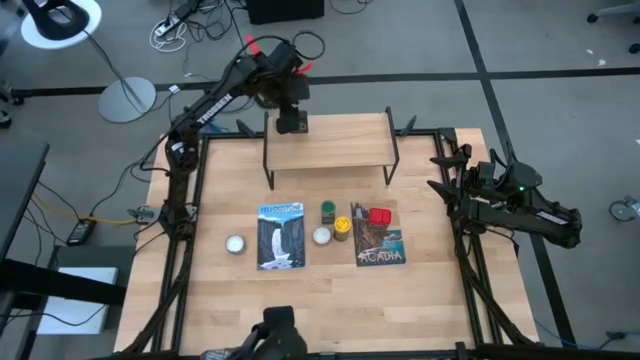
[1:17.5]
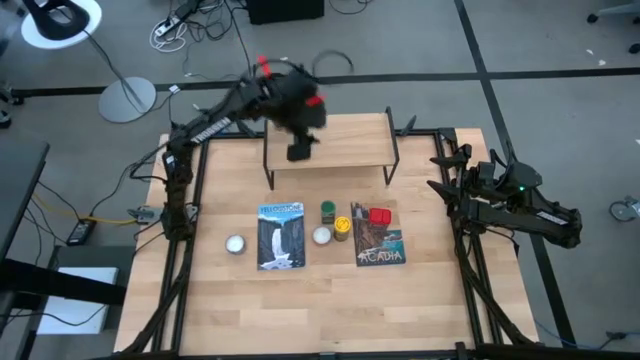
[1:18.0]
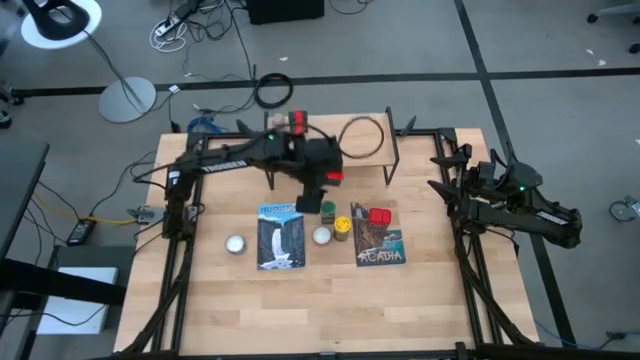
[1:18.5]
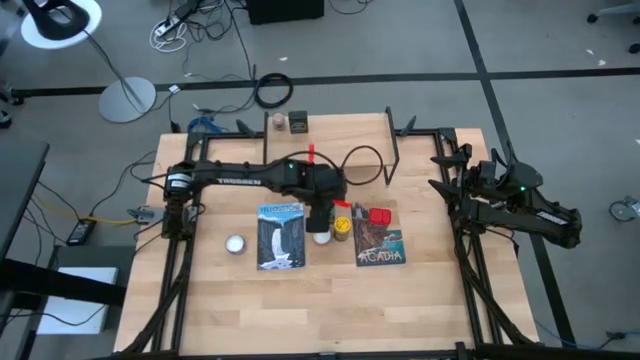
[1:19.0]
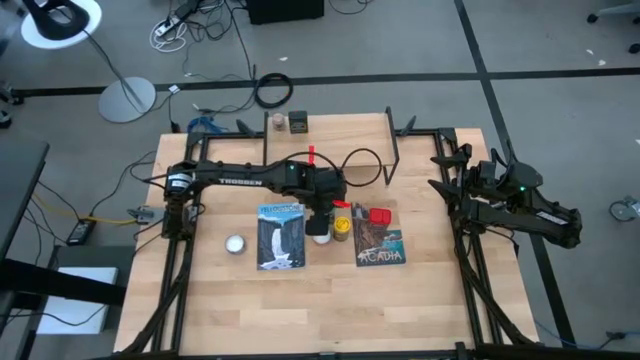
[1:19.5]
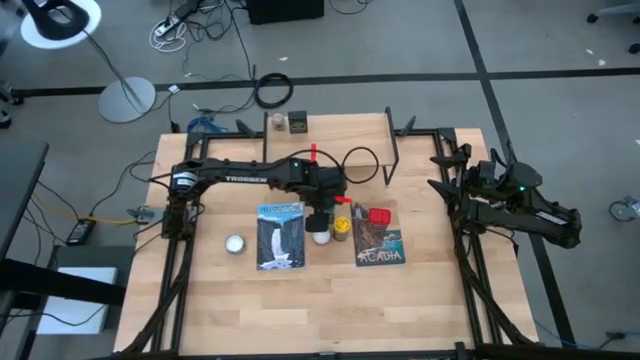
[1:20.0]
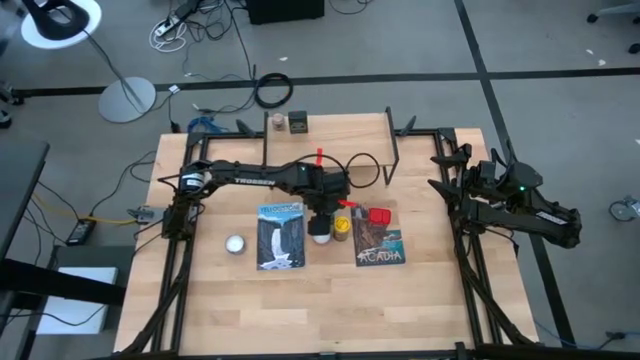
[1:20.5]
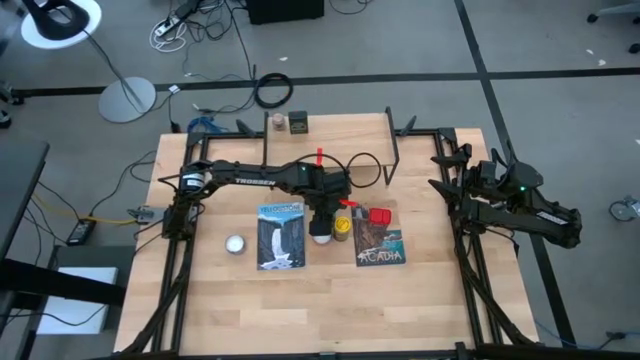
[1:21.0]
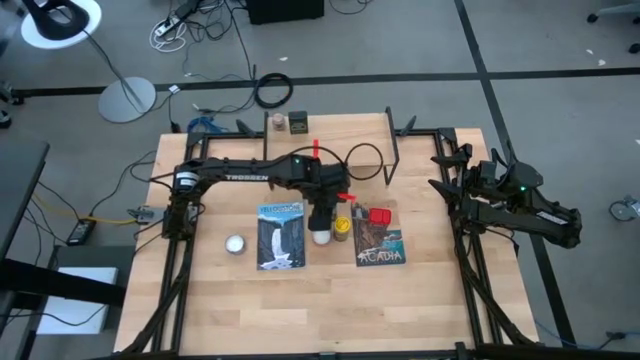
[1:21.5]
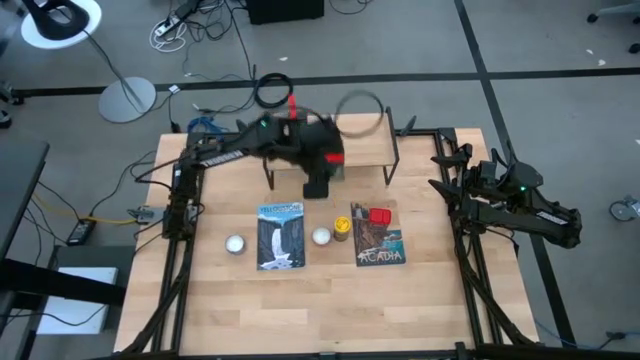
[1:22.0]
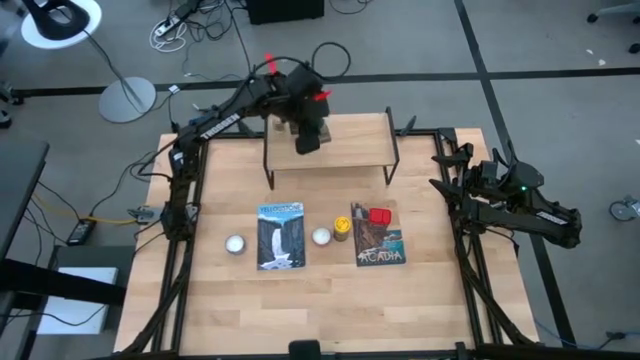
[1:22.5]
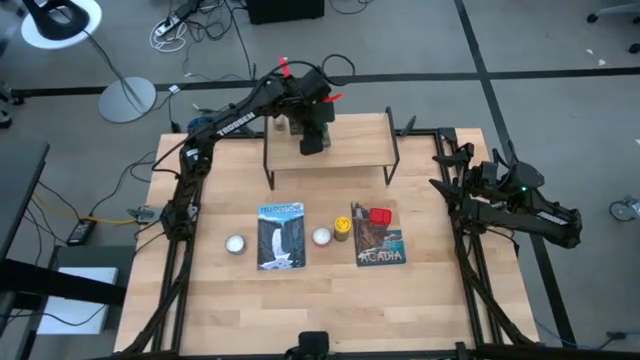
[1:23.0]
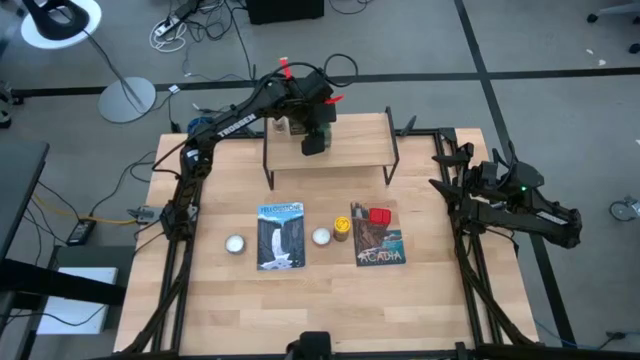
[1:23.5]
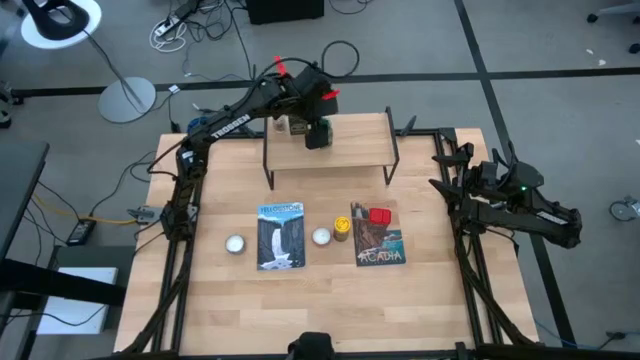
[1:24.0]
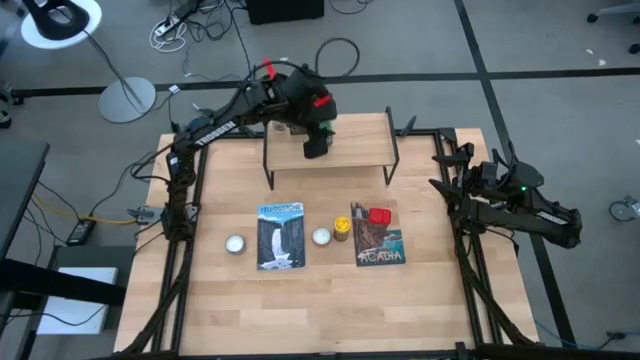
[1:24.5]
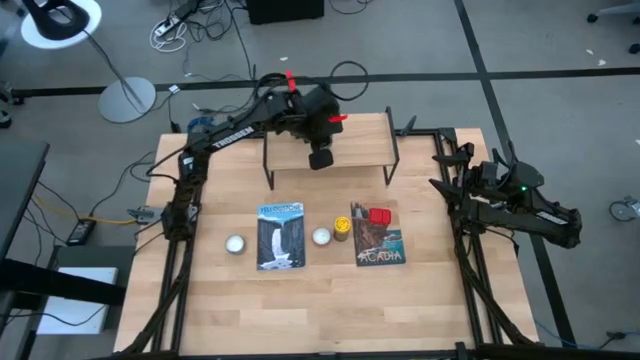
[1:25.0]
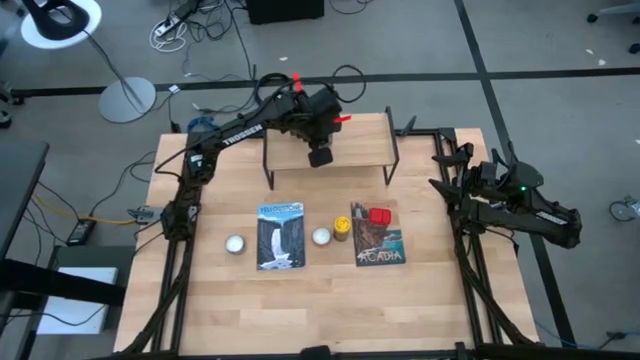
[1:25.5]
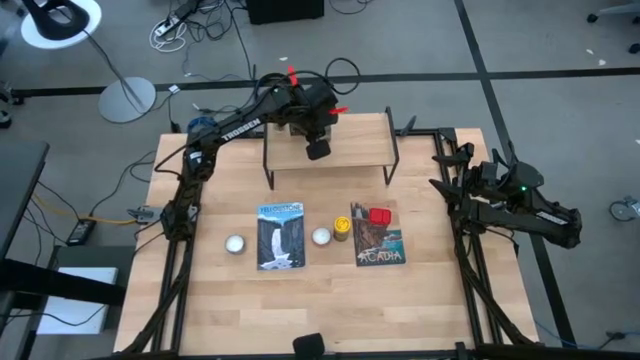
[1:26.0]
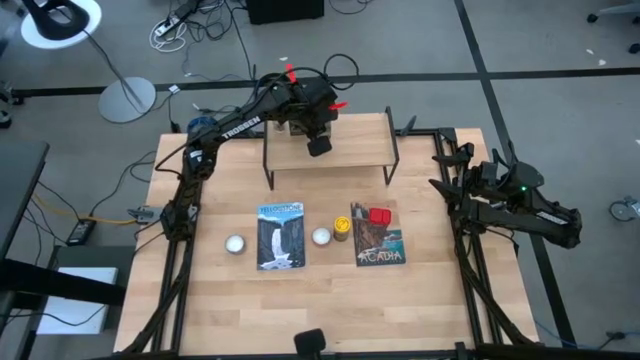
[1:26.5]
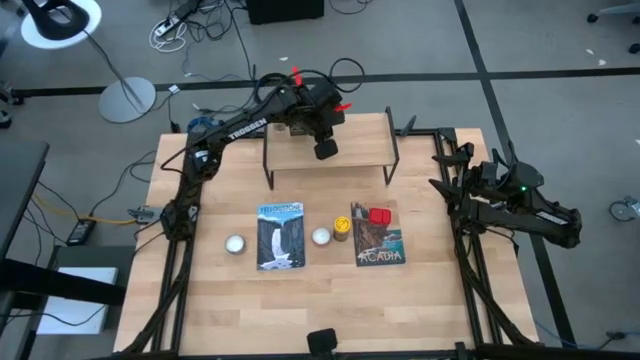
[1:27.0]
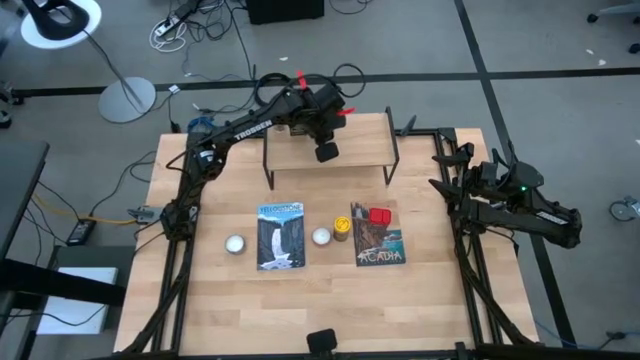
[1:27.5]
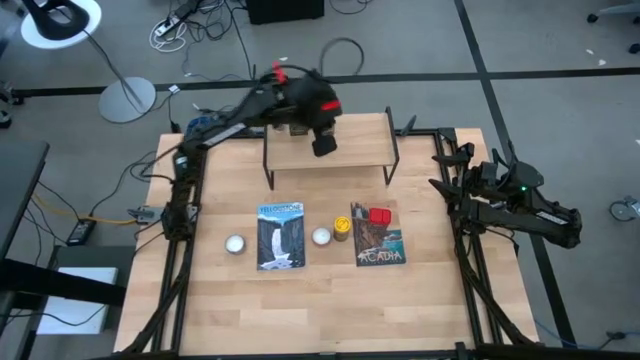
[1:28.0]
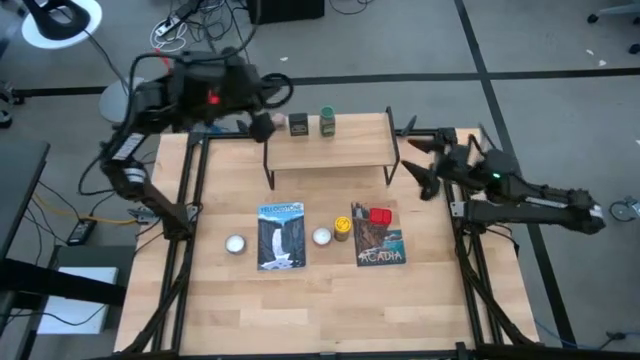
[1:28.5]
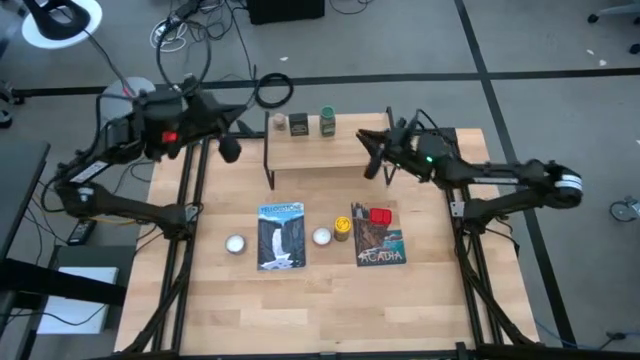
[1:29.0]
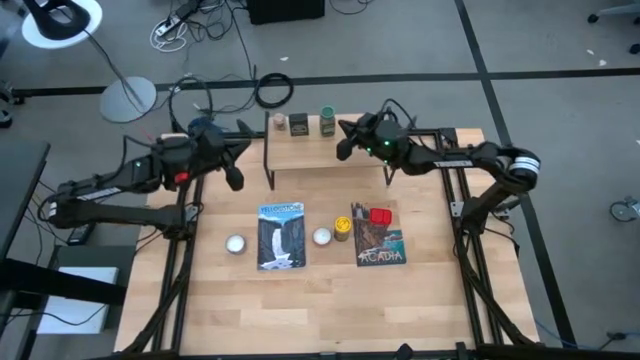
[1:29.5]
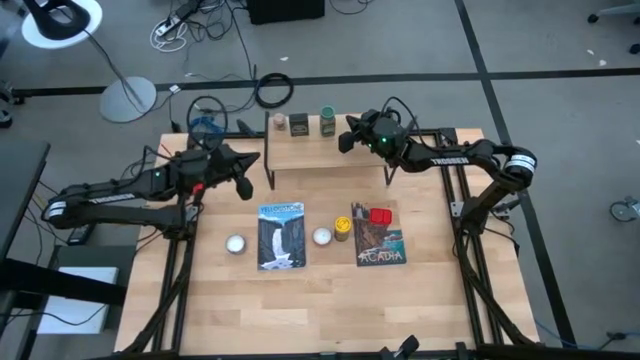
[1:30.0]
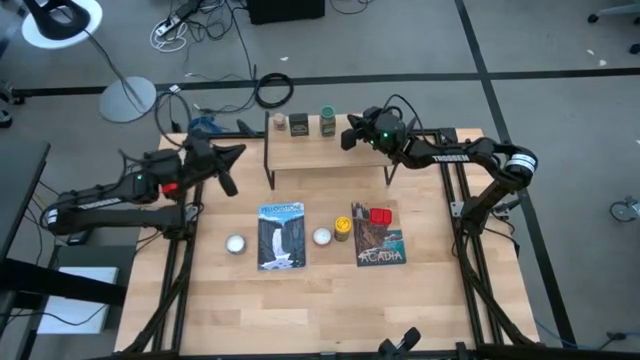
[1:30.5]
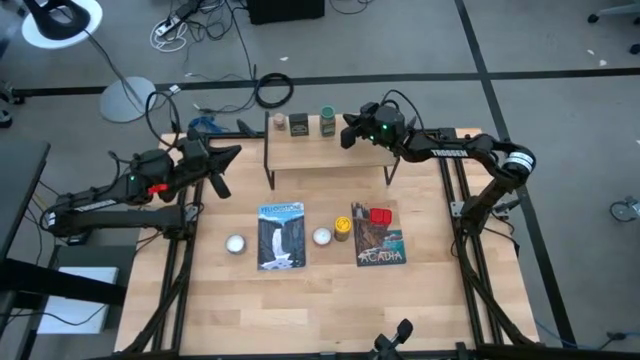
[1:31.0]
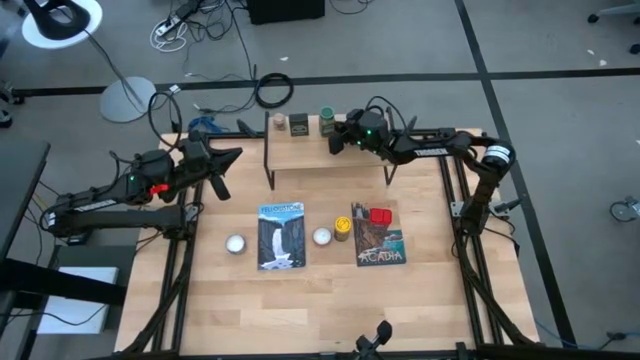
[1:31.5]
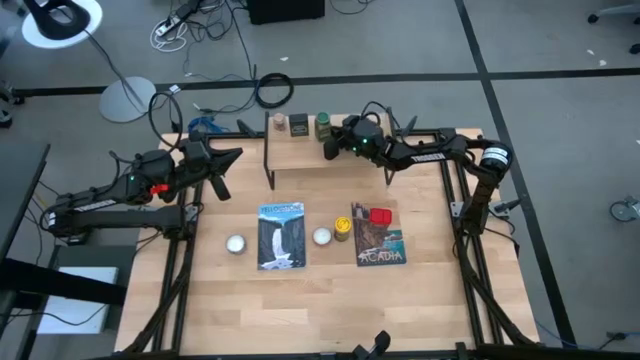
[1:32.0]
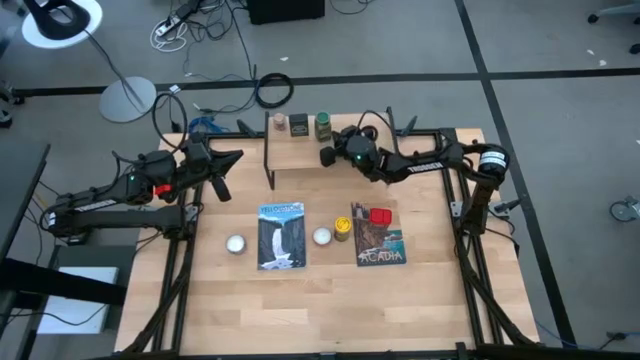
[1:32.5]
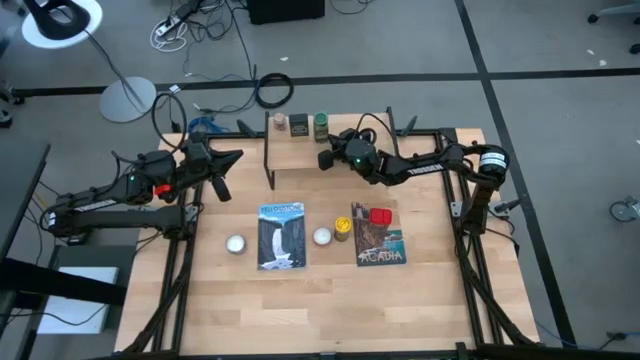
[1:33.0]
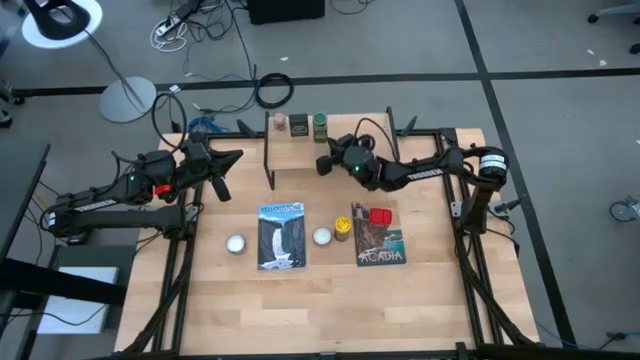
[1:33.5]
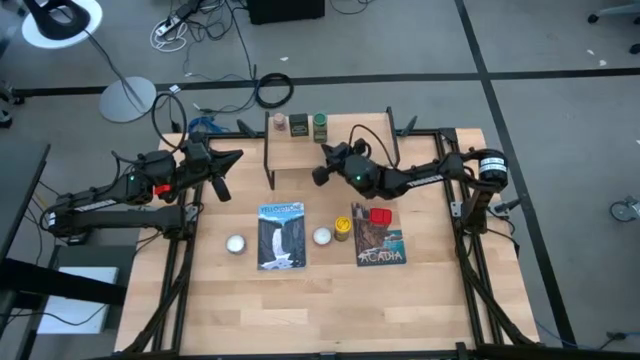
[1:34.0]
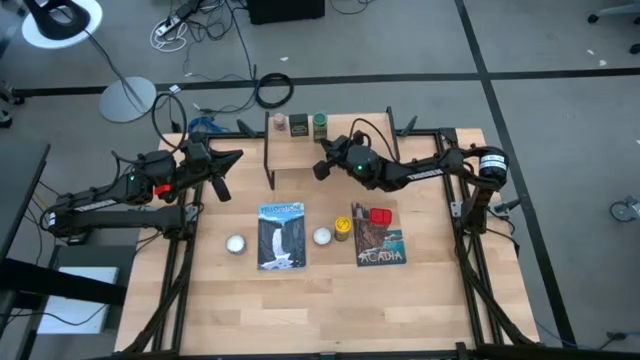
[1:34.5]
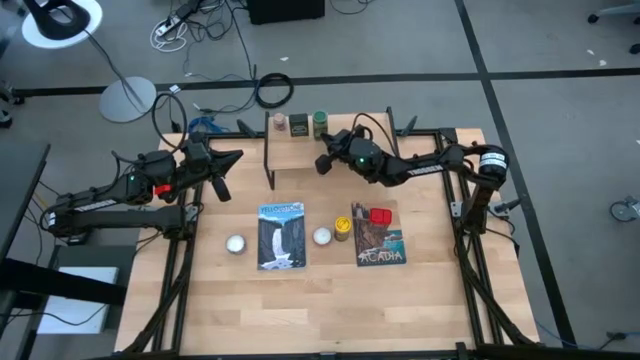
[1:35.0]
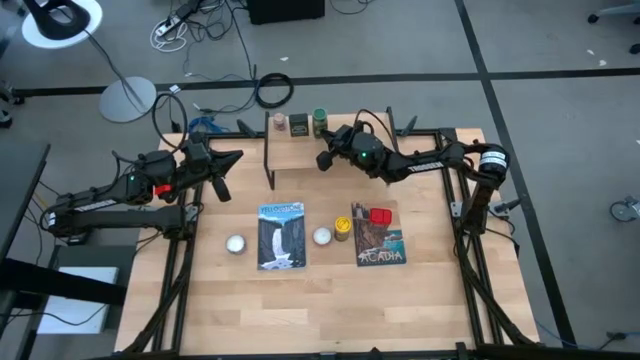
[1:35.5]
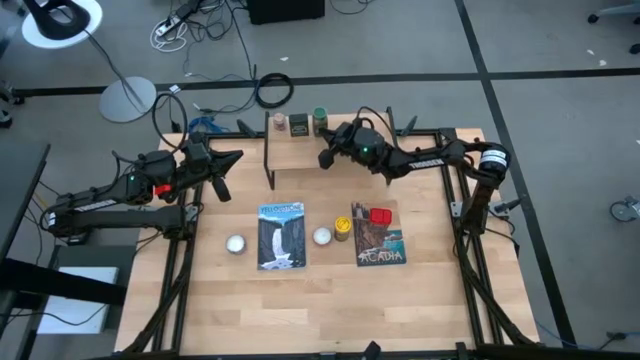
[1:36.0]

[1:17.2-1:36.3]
Task: Shelf spices
Put the green spice on the shelf
